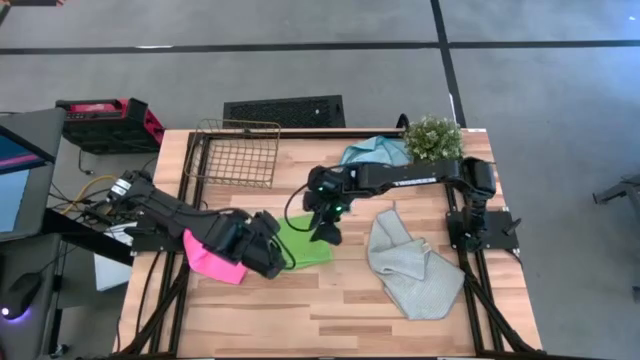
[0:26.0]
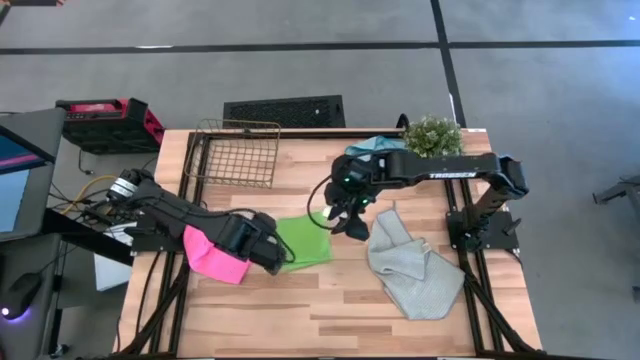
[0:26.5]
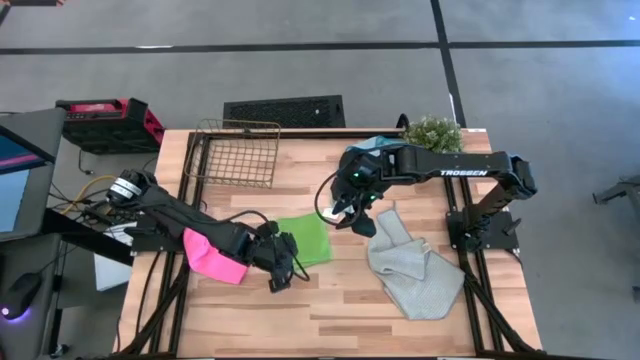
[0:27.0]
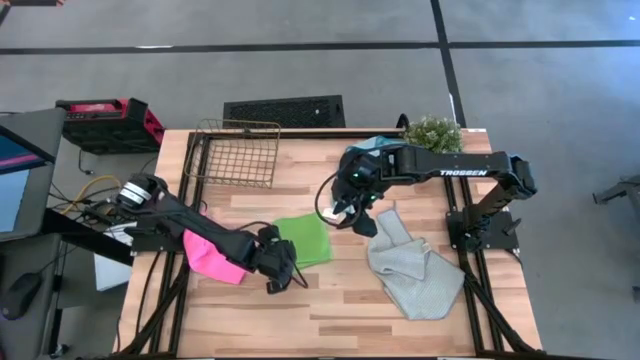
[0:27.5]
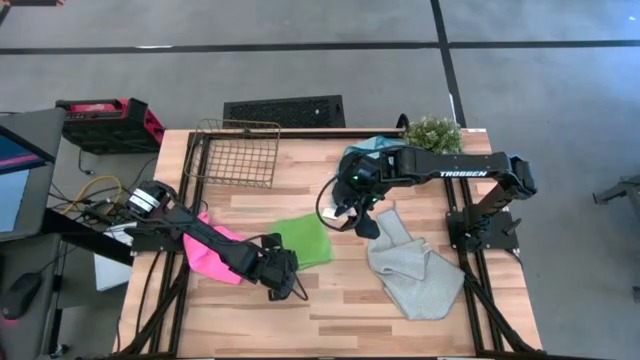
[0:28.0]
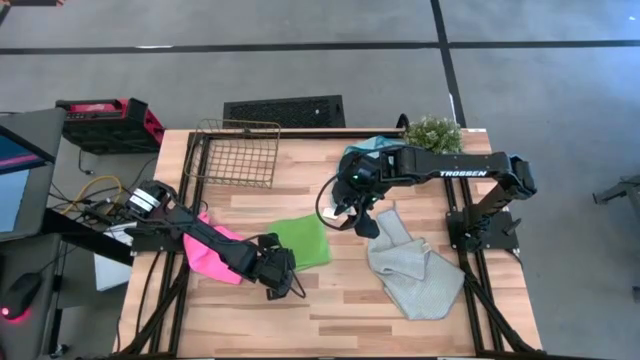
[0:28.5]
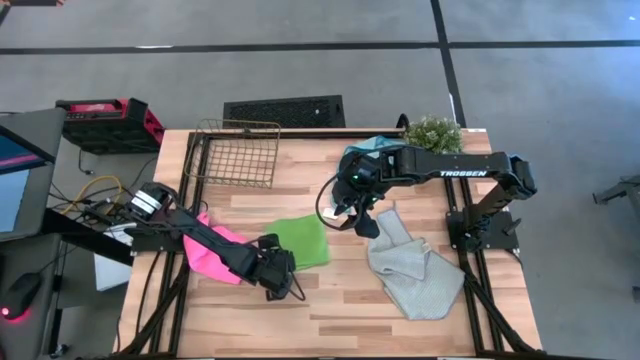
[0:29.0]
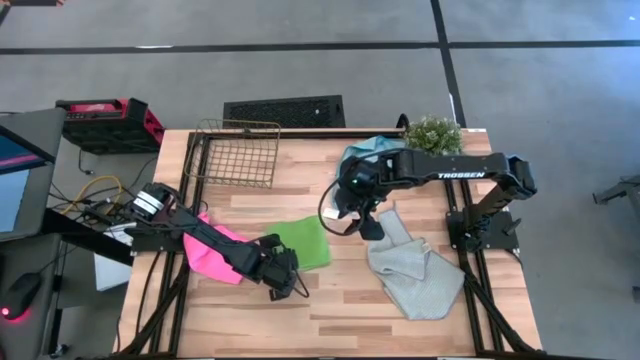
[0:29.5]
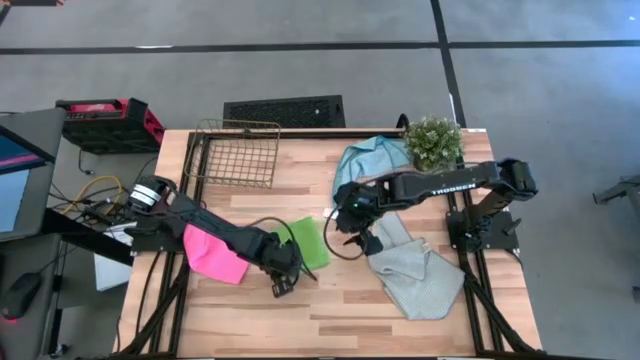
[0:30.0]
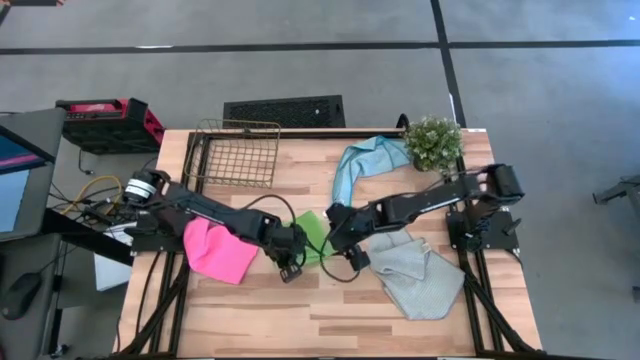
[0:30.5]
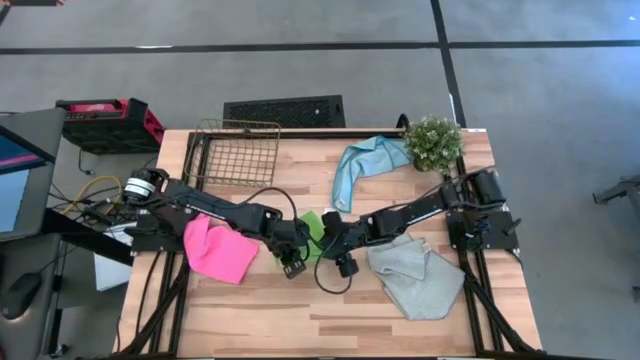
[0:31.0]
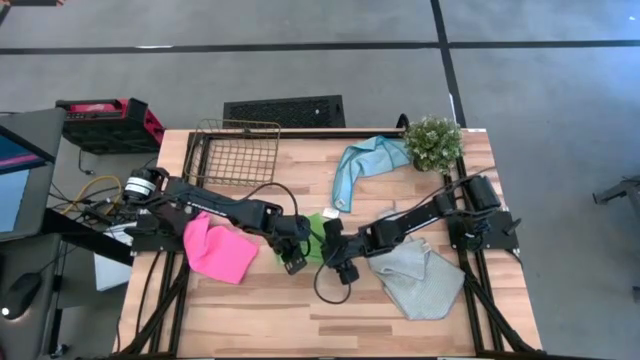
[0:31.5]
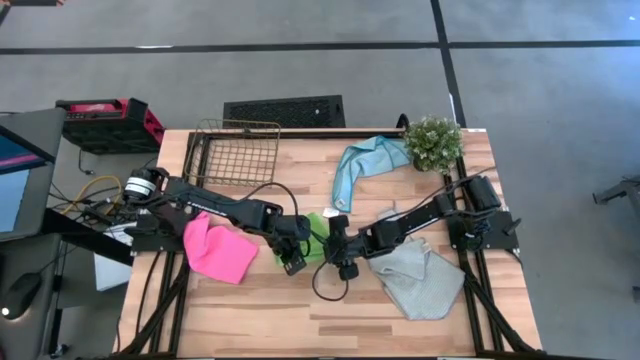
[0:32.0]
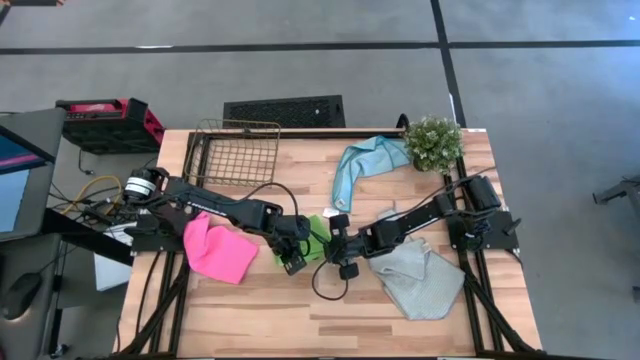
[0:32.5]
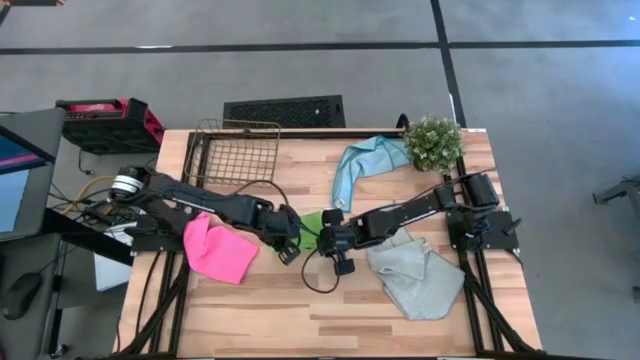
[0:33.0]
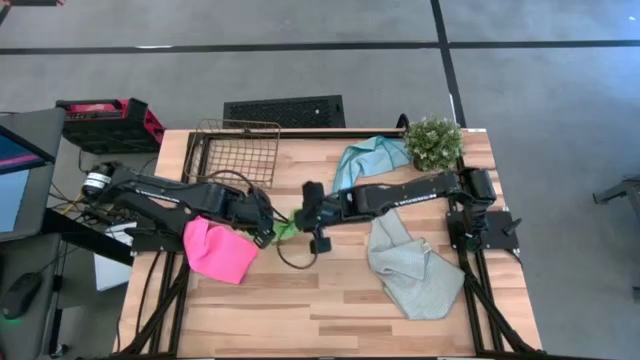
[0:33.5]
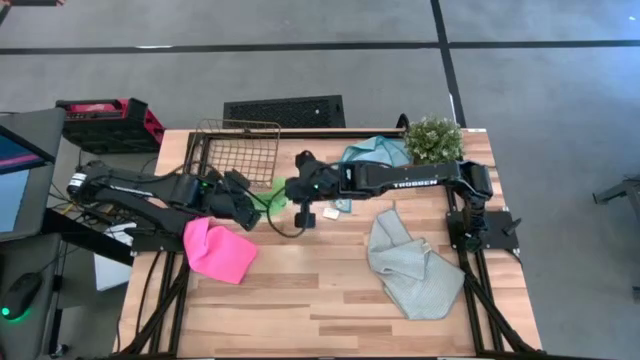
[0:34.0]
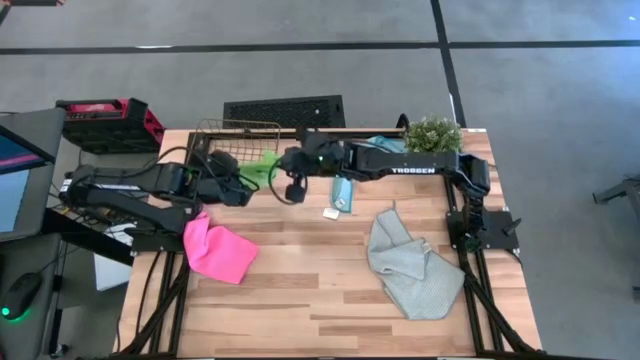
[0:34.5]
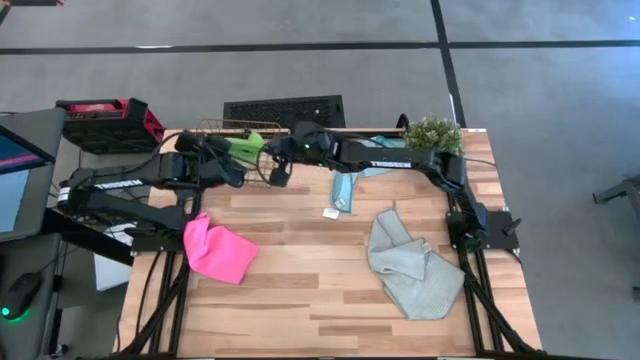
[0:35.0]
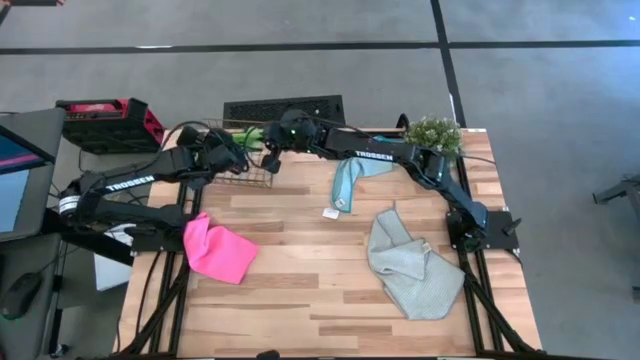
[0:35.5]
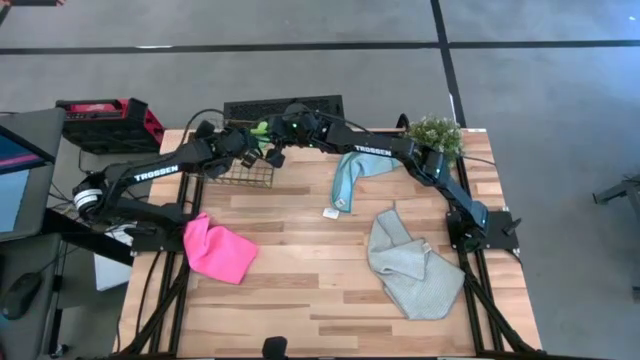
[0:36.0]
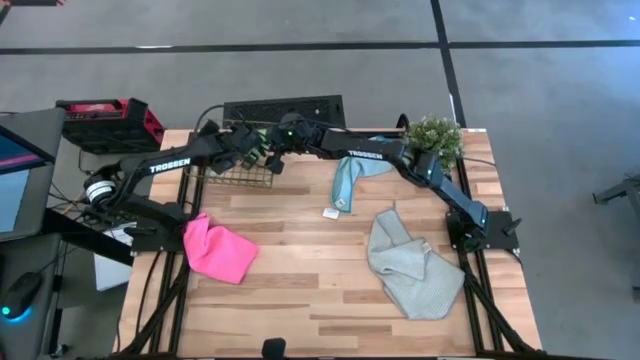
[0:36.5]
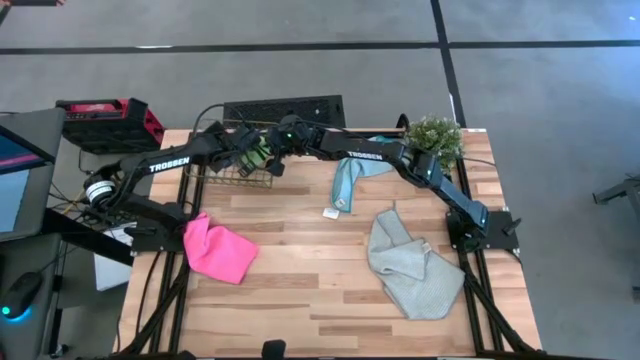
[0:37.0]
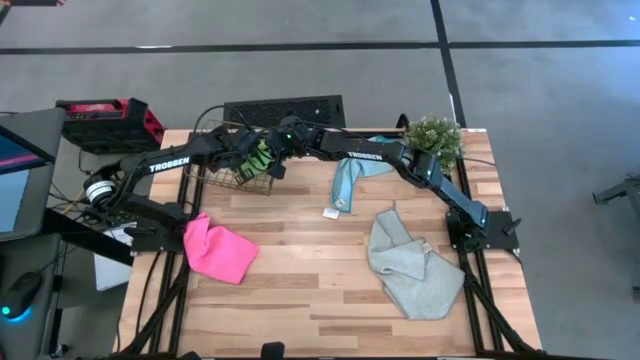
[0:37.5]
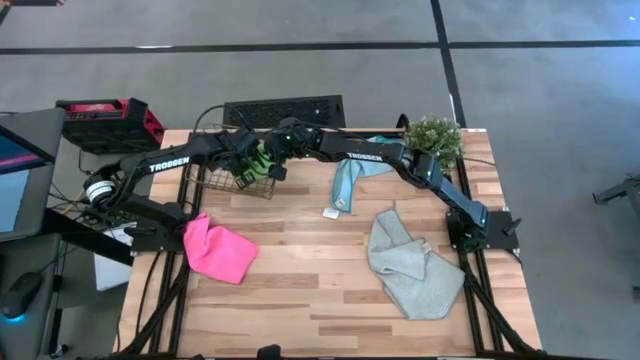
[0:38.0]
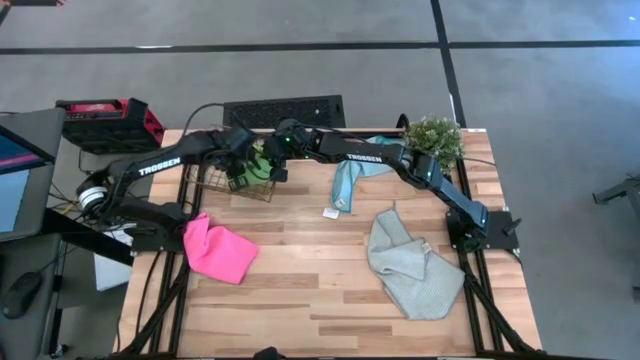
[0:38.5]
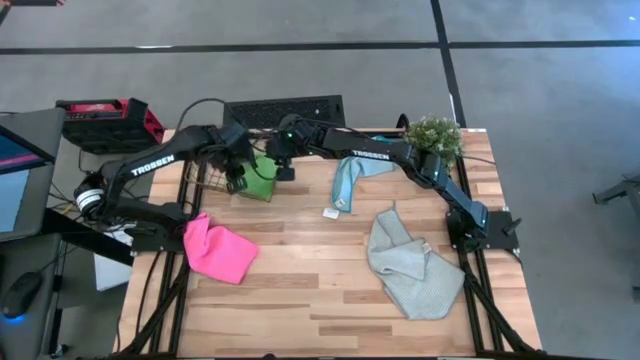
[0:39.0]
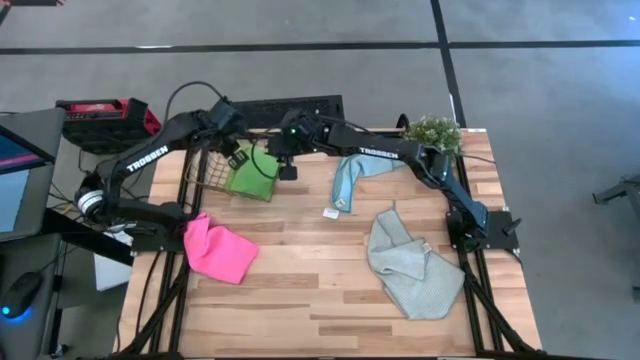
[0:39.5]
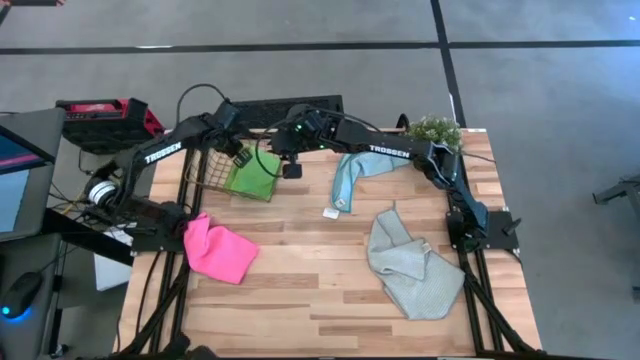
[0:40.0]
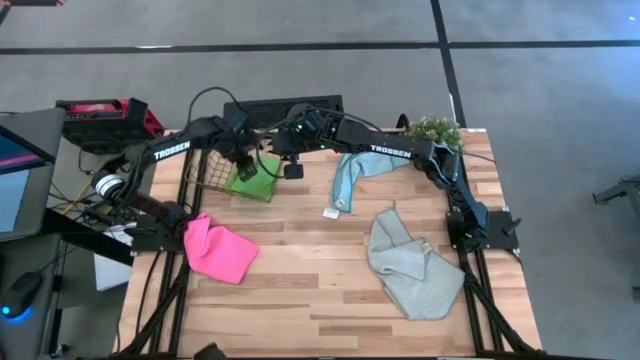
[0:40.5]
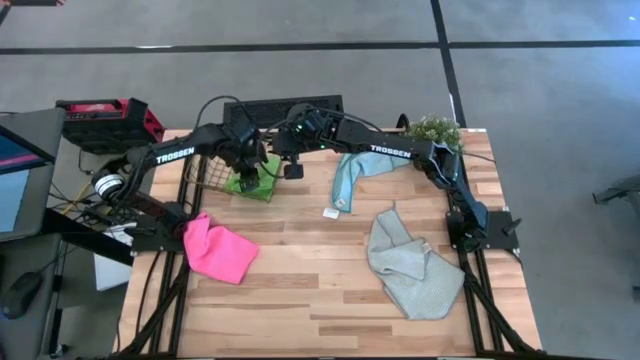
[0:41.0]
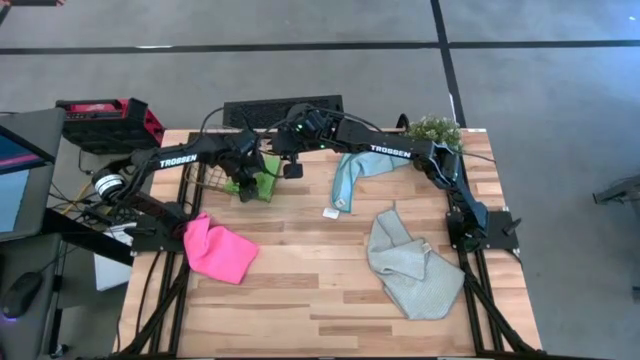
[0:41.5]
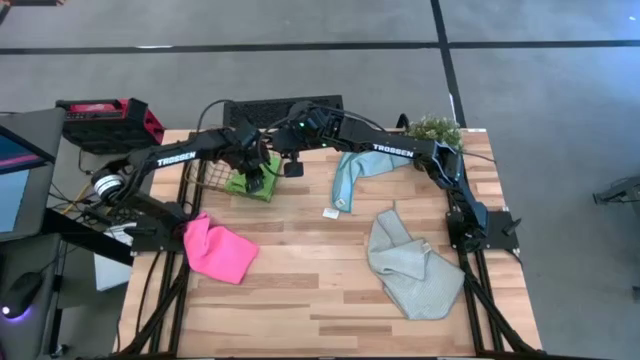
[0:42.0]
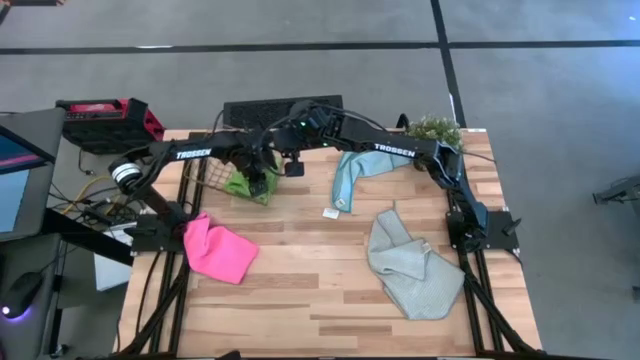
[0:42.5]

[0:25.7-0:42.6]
Task: Fold microfiber towels
Put the green microfiber cloth into the gold wire basket

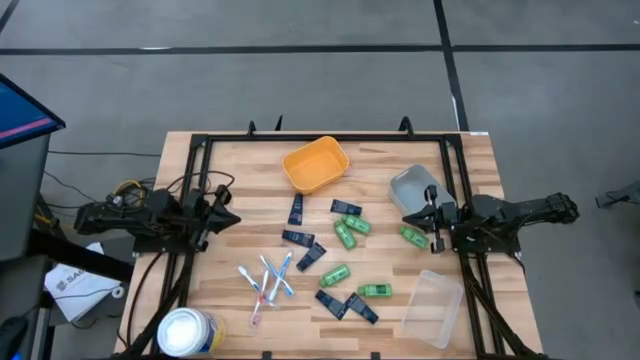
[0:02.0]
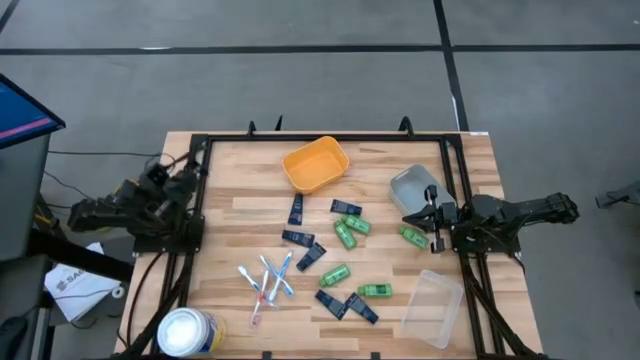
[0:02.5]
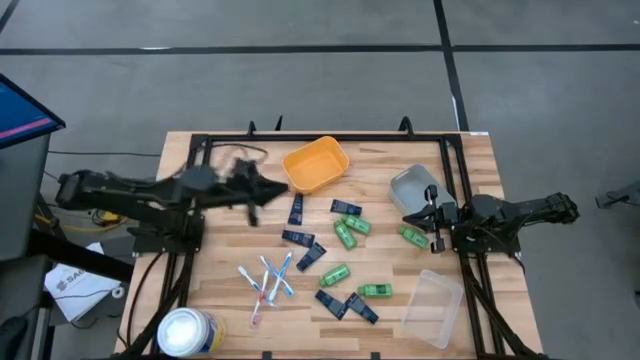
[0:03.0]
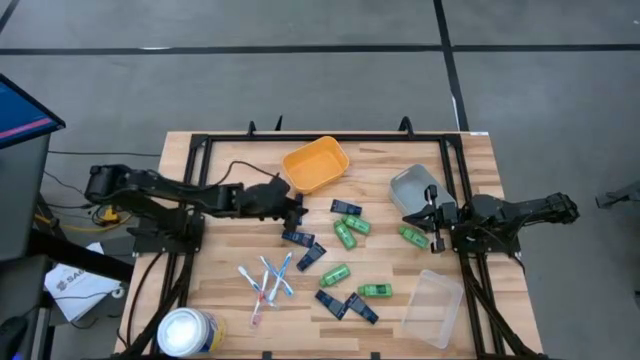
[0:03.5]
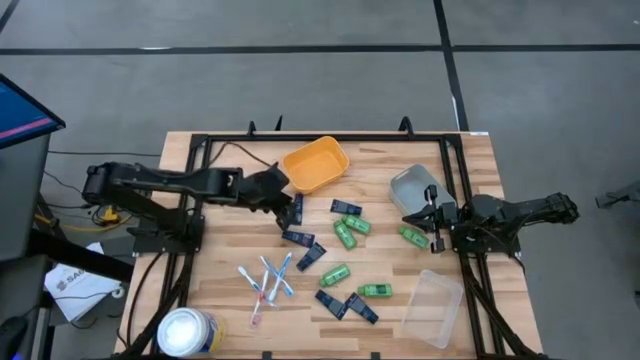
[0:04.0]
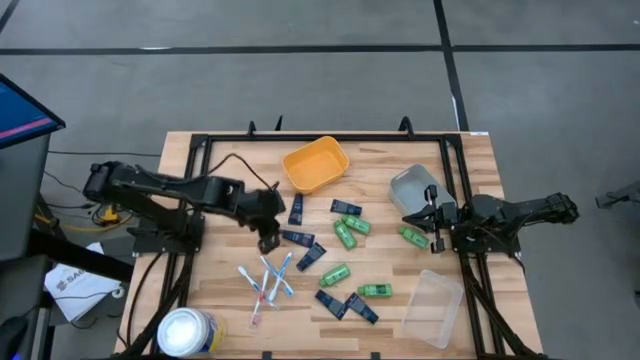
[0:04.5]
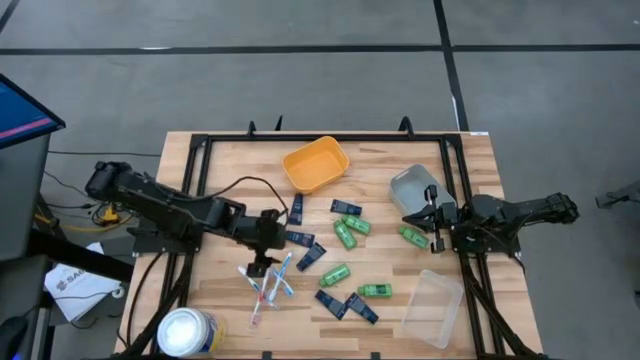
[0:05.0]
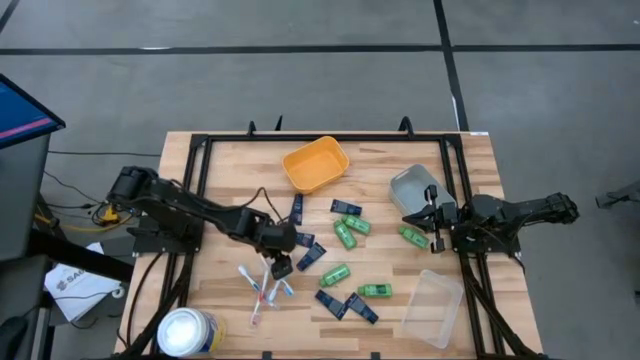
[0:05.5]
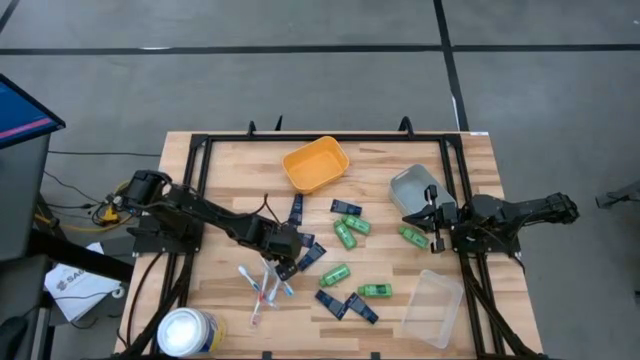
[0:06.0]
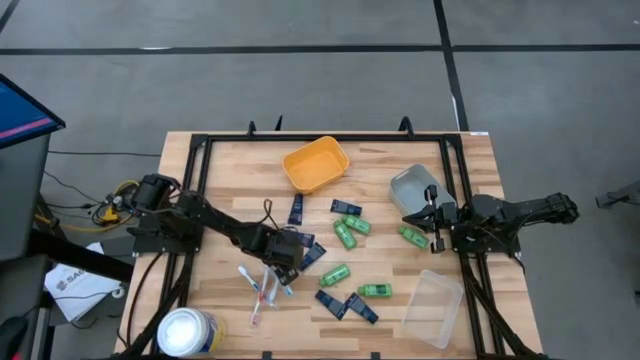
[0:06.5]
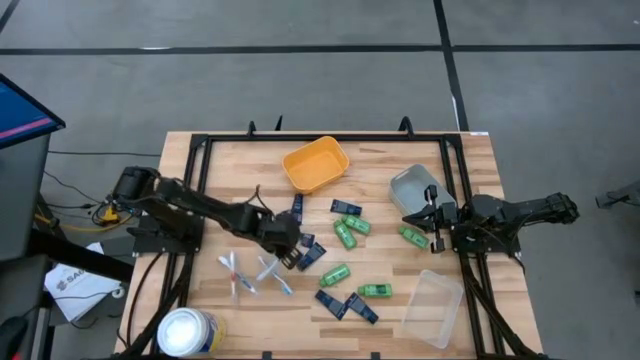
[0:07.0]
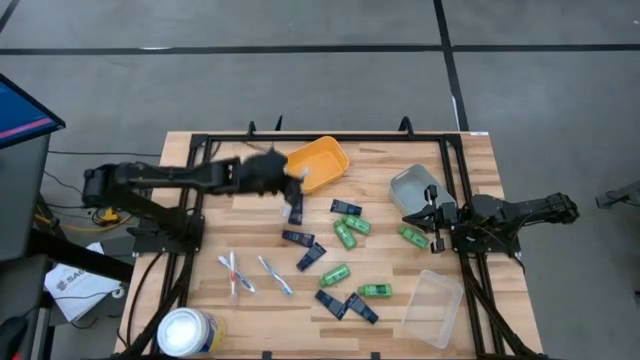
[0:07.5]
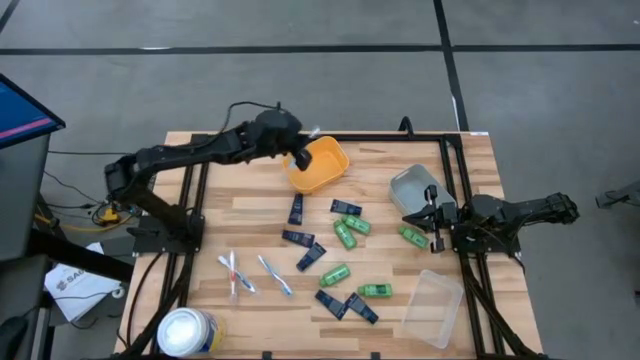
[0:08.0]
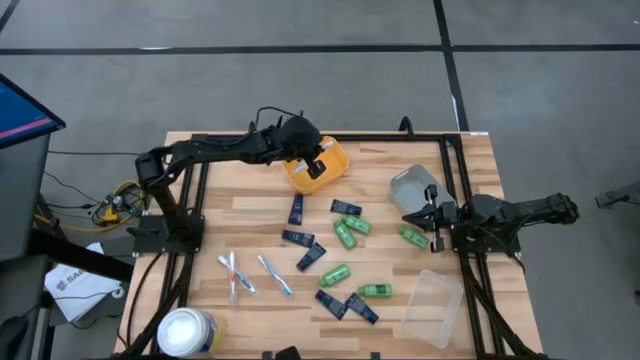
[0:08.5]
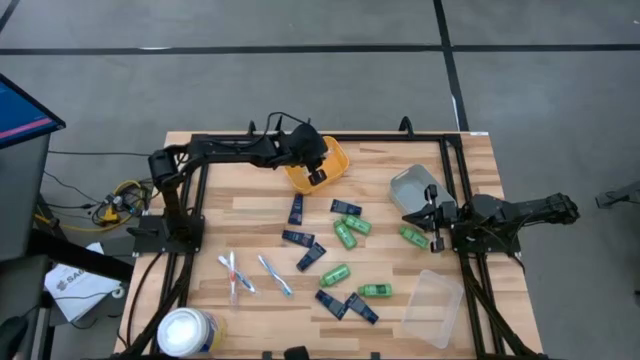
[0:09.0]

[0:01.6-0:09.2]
Task: Pick & Place Travel size toiletries
Put the blue toothbrush into the yellow bin
